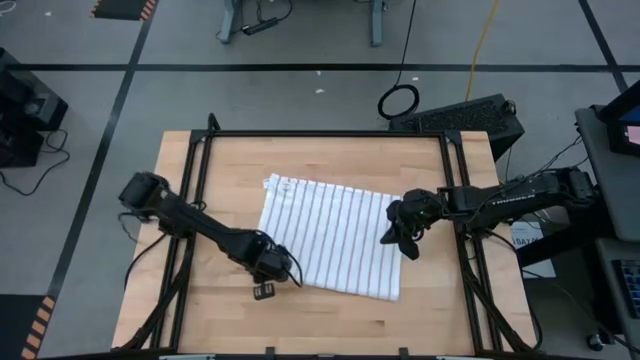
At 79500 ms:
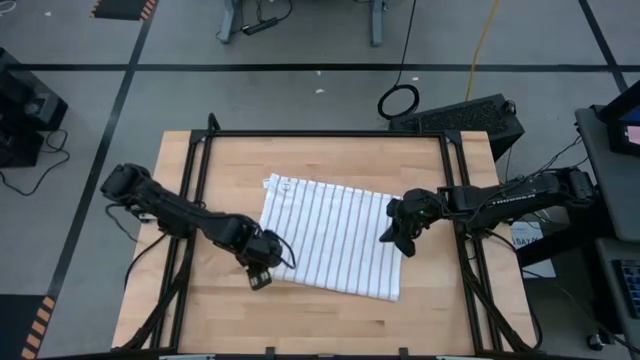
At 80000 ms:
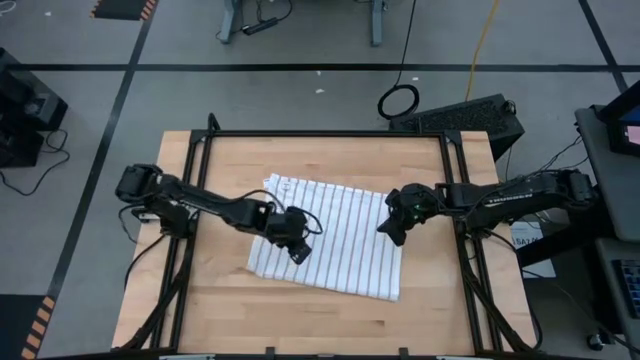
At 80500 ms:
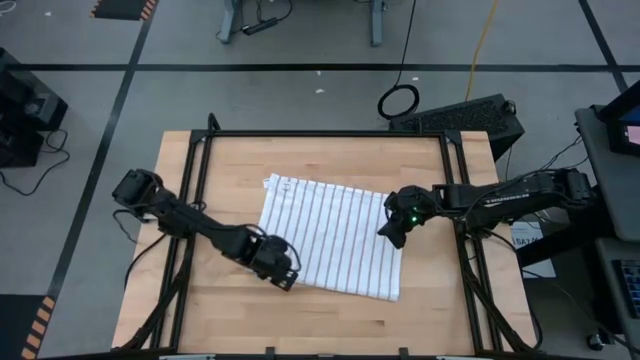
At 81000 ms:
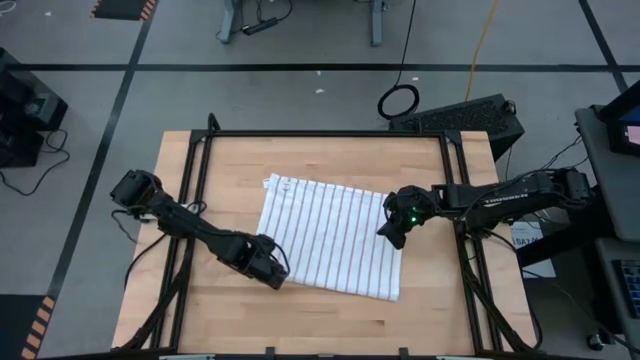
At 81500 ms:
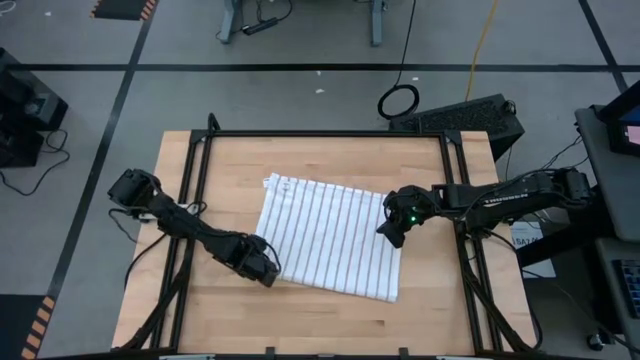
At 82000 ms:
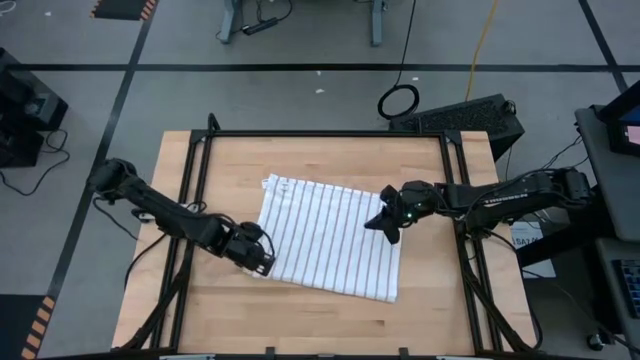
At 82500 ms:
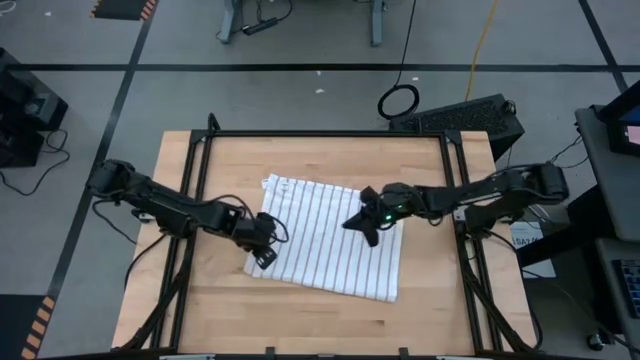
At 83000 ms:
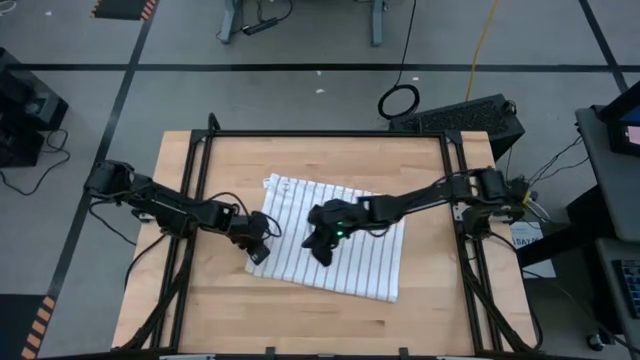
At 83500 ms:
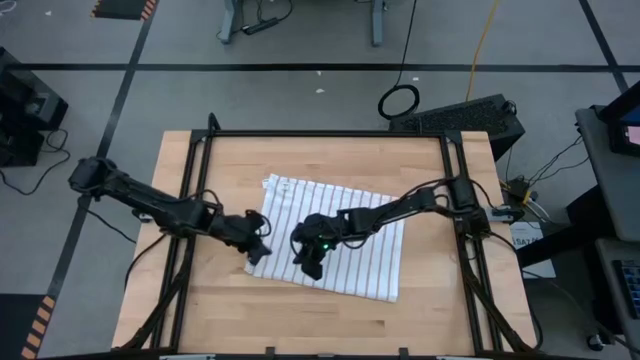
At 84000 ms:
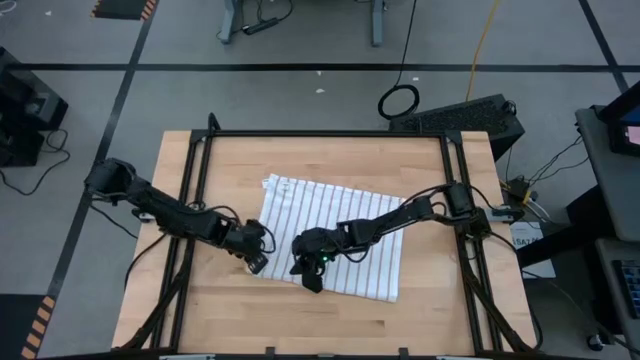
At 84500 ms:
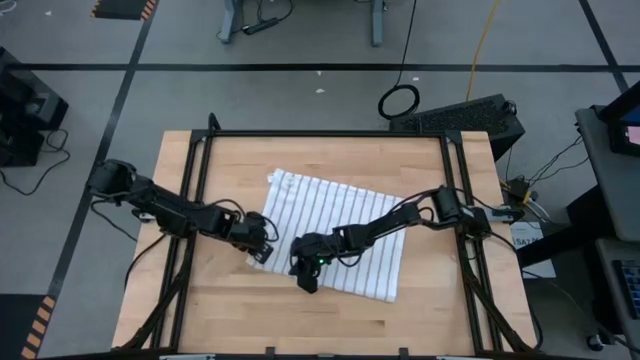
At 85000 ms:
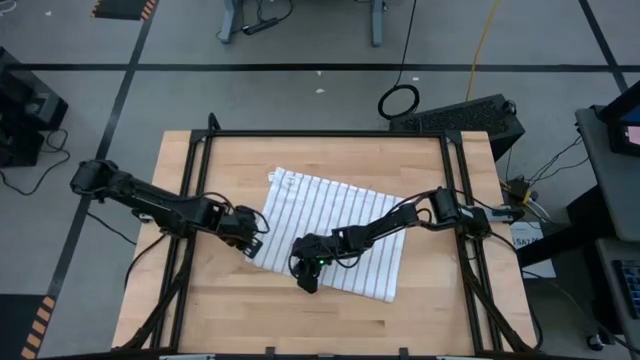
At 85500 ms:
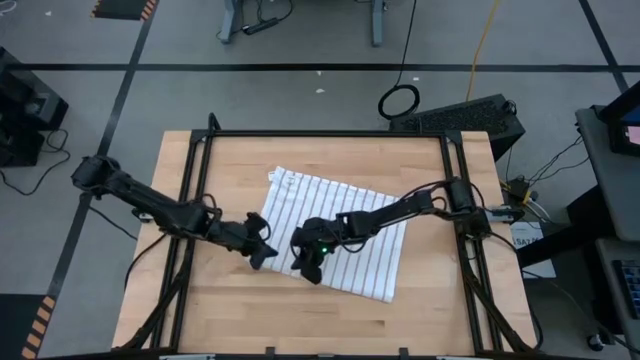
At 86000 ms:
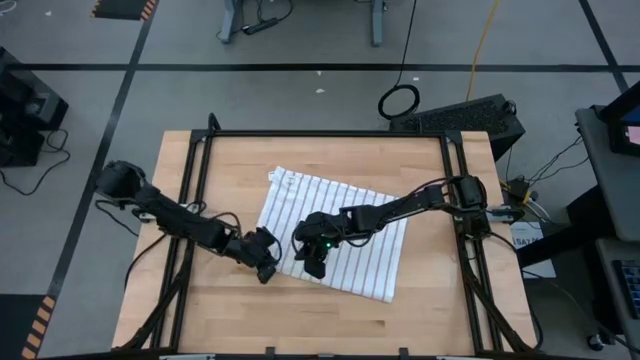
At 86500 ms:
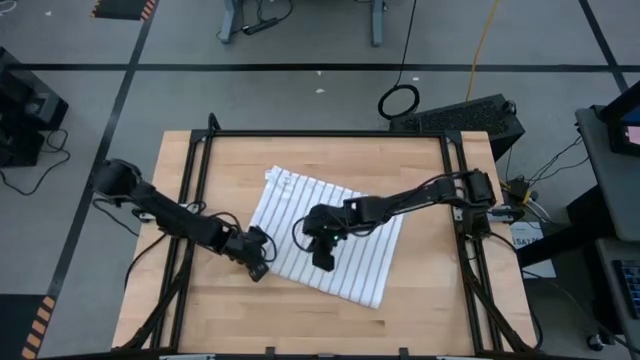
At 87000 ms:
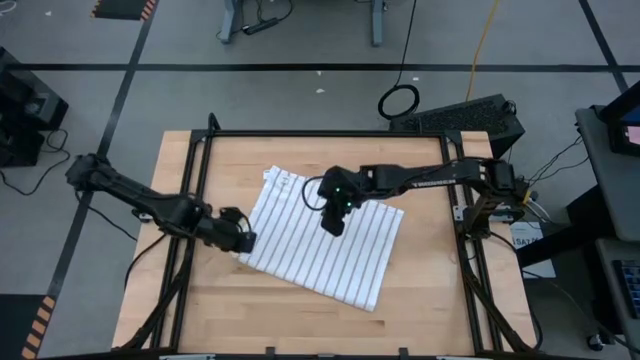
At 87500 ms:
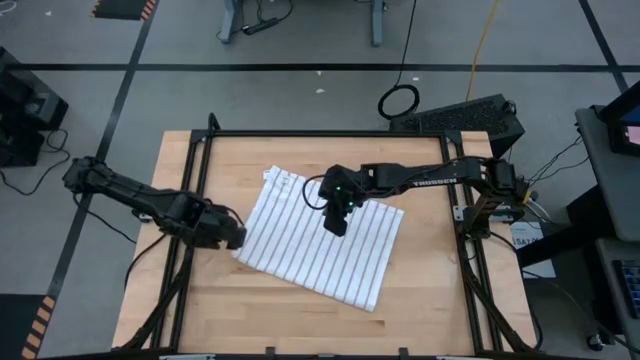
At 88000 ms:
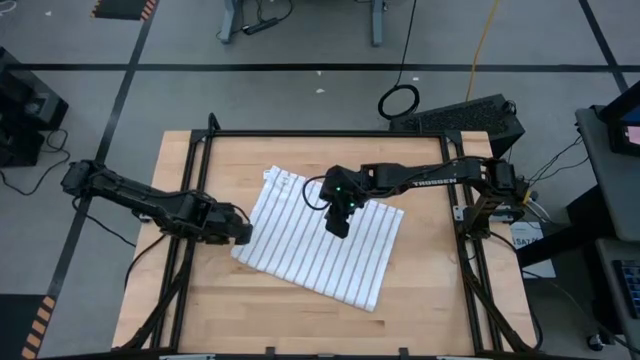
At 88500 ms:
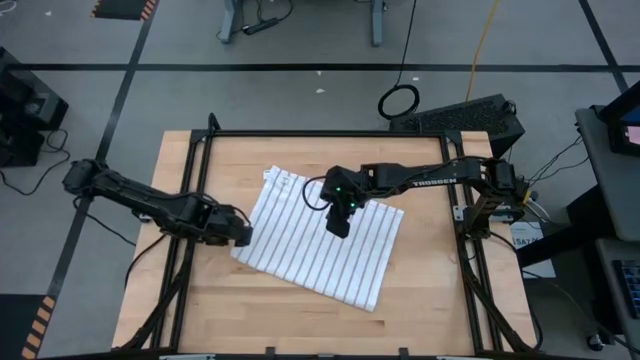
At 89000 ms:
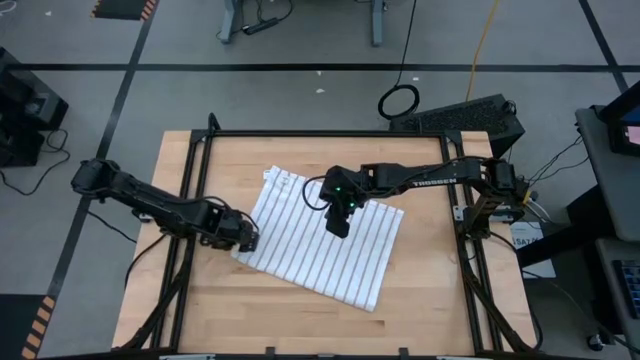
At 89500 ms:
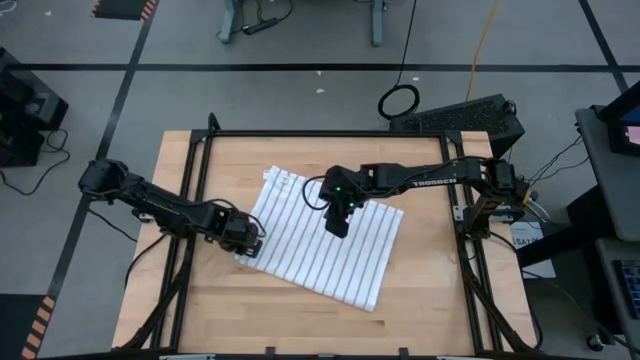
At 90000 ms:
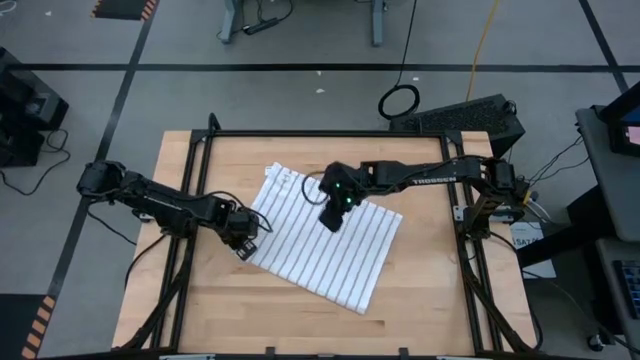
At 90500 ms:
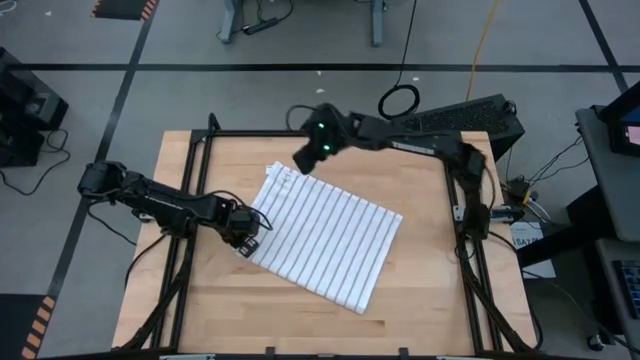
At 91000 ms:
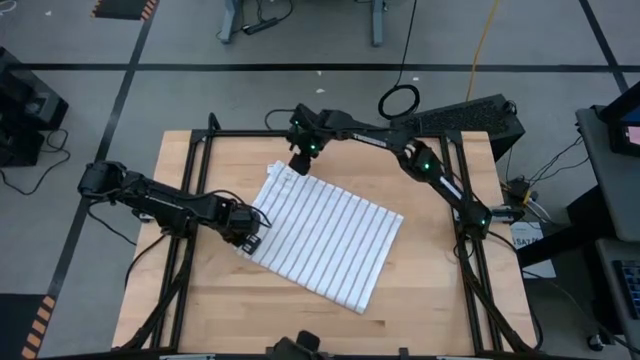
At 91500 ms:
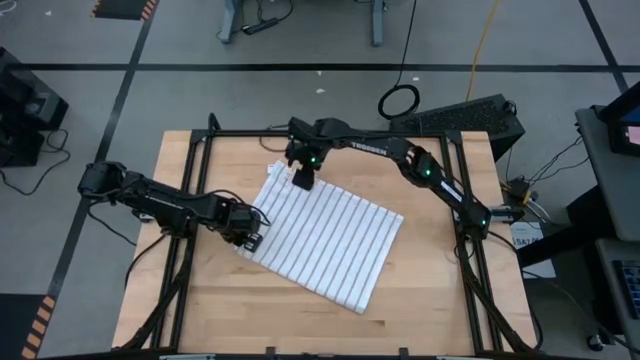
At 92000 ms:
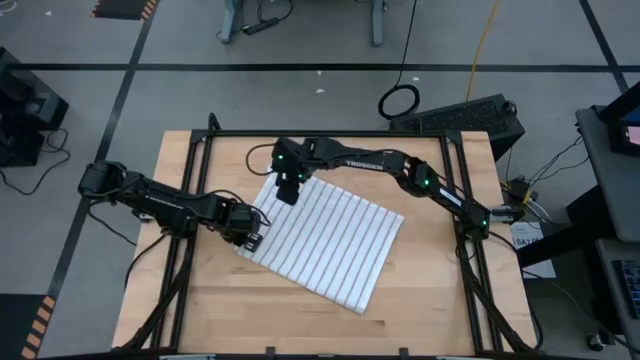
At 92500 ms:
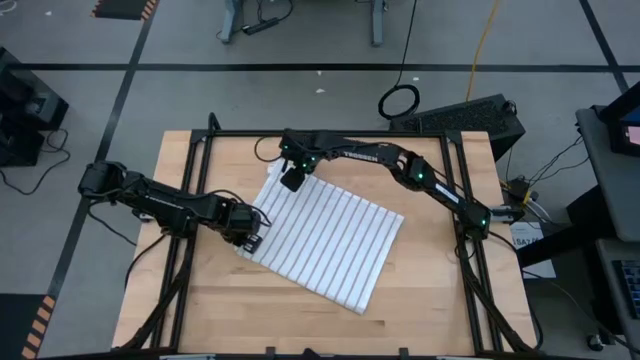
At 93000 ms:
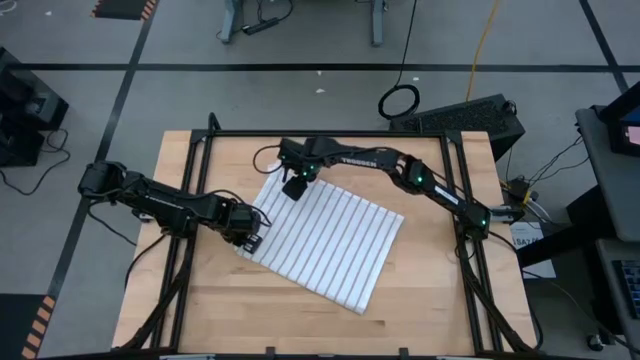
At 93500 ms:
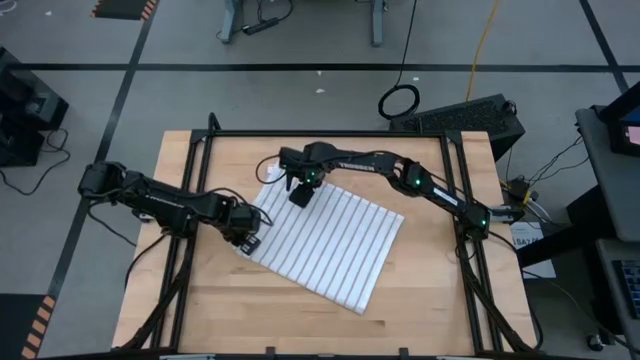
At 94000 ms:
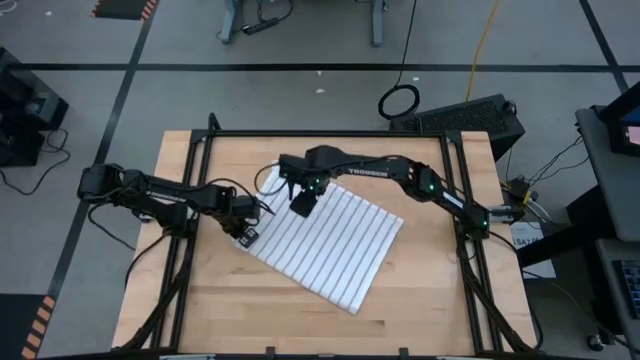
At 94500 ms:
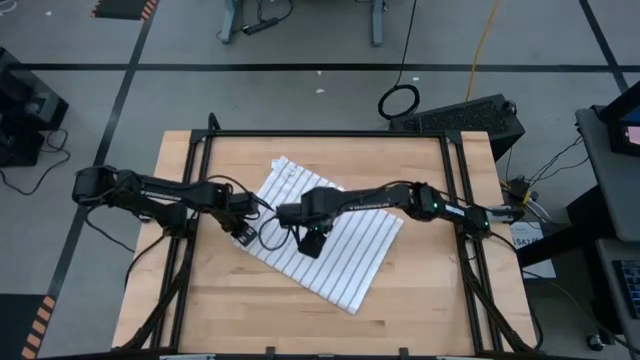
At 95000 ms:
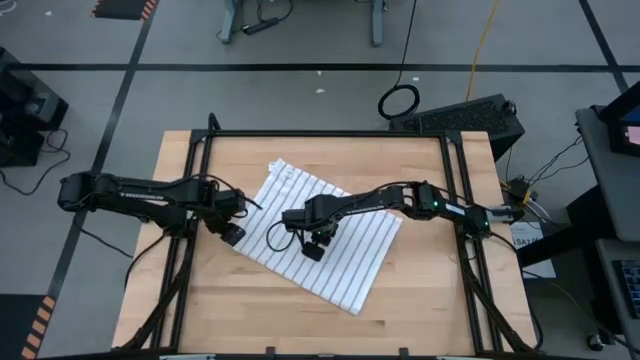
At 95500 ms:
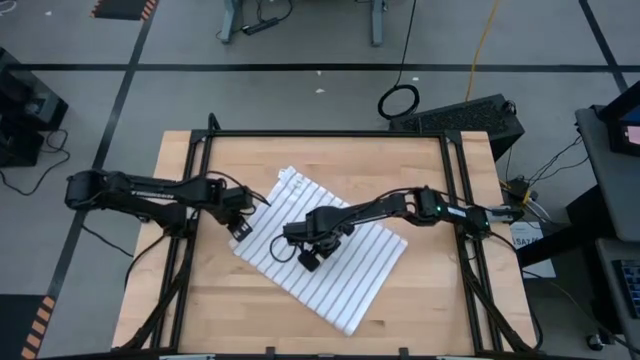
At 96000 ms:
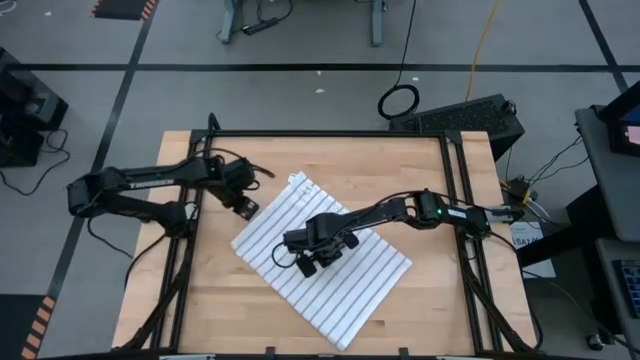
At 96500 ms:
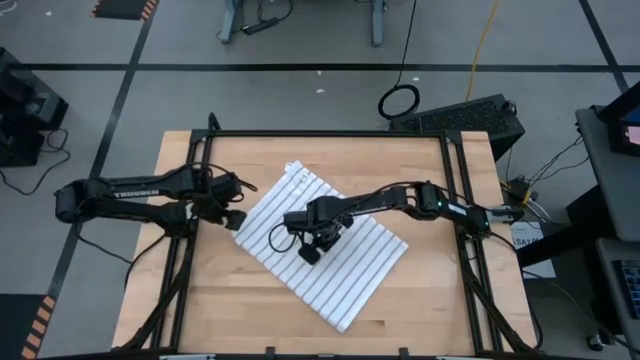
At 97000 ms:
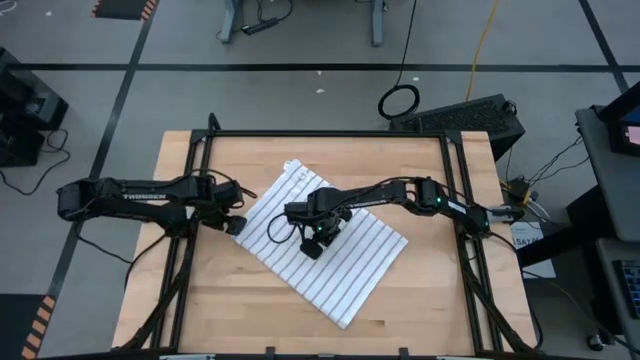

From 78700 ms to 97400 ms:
Task: Roll towel
Roll the white towel

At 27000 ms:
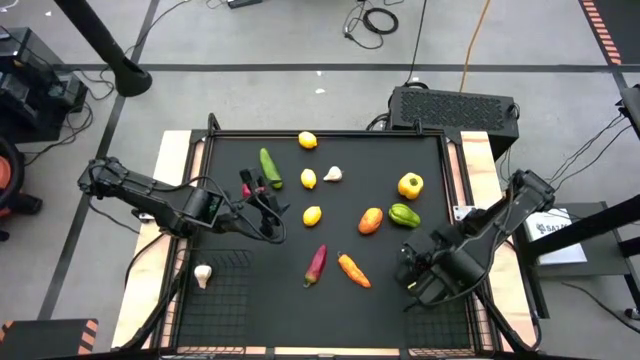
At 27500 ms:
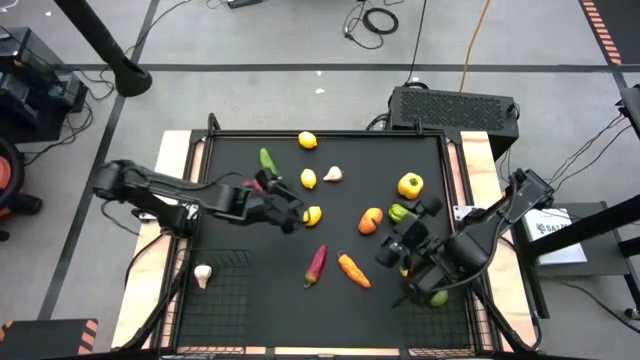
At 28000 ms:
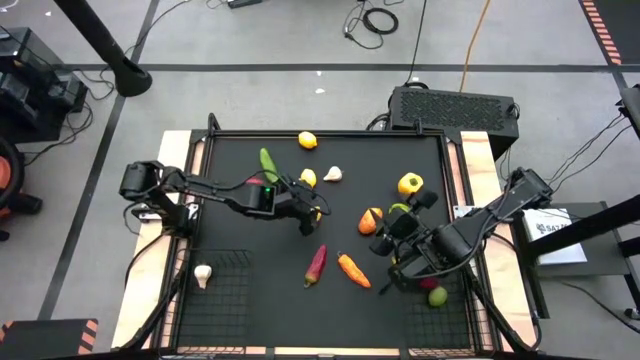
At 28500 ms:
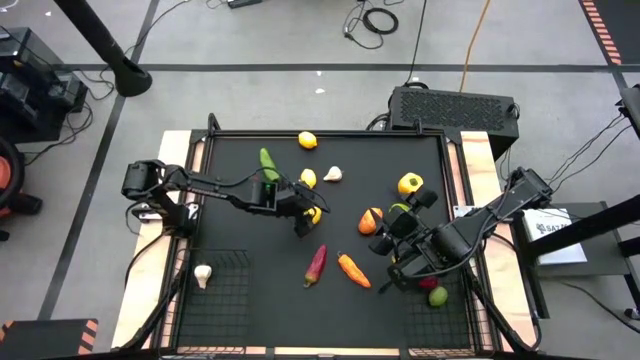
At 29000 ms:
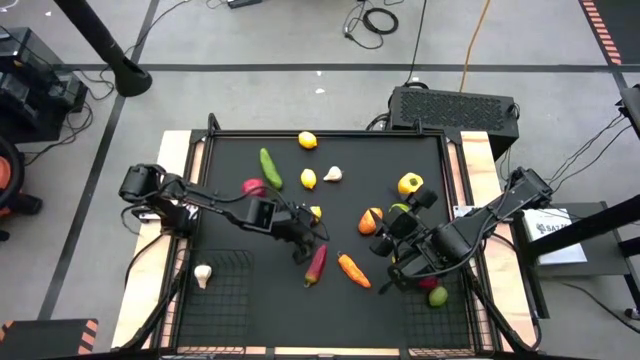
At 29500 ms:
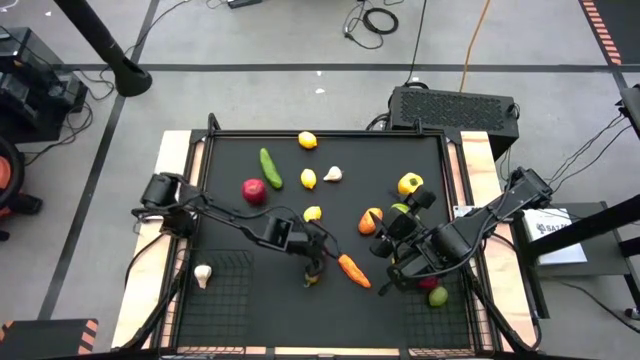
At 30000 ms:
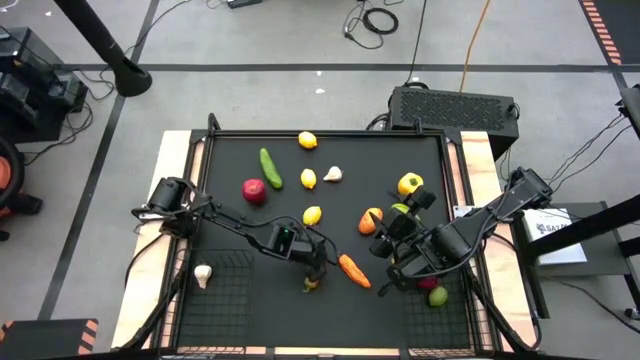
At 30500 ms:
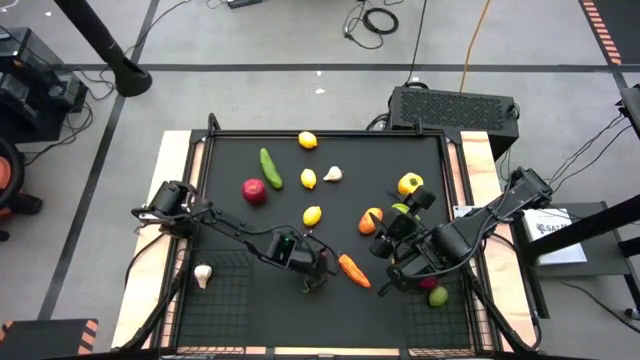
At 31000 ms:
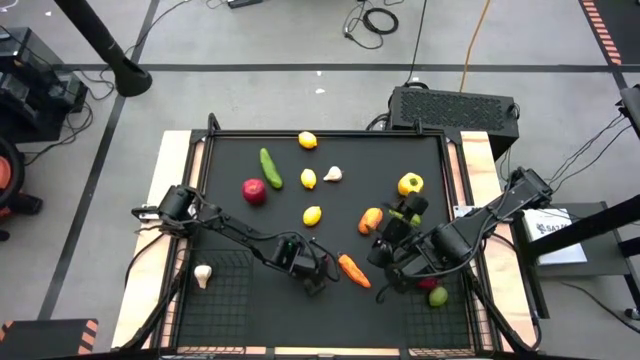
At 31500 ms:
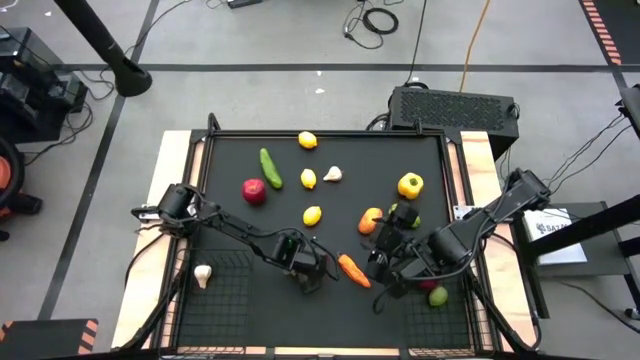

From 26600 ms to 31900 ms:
Task: Sort produce into baskets
Put the red pepper into the bottom left basket
